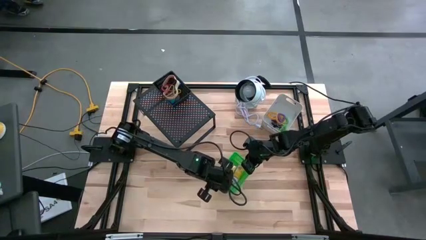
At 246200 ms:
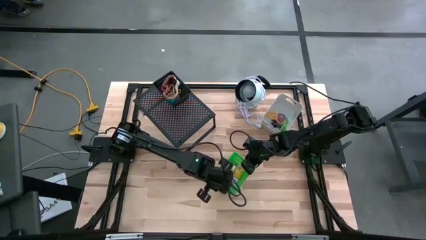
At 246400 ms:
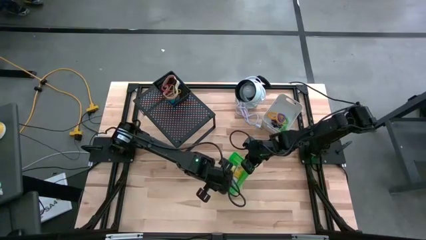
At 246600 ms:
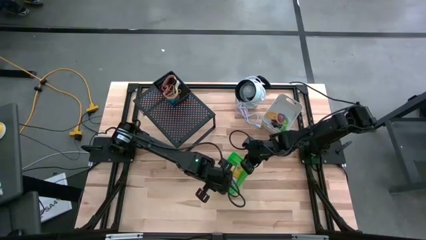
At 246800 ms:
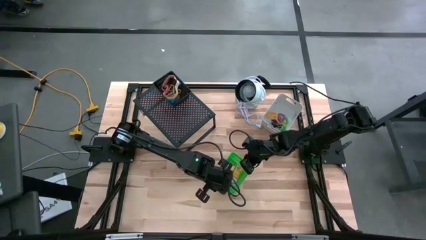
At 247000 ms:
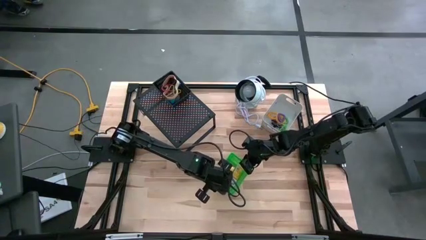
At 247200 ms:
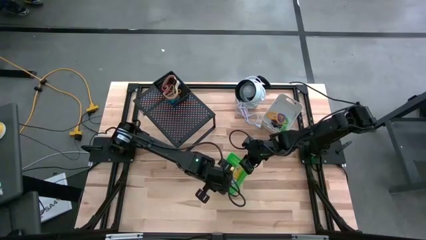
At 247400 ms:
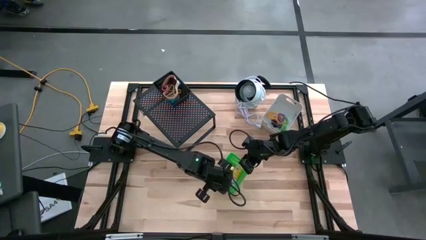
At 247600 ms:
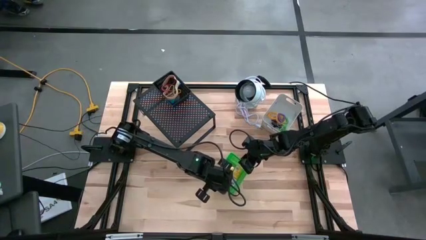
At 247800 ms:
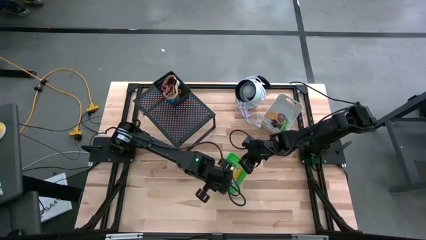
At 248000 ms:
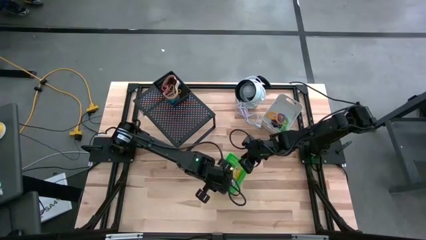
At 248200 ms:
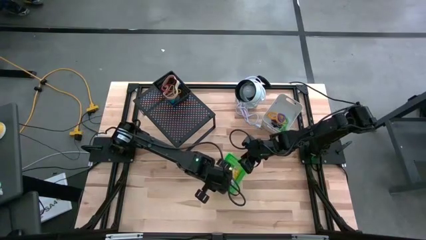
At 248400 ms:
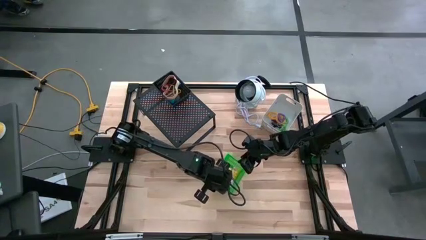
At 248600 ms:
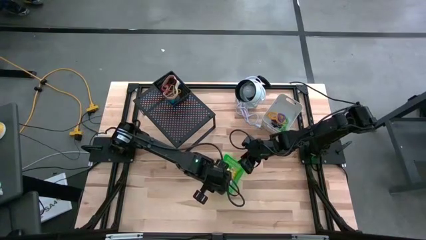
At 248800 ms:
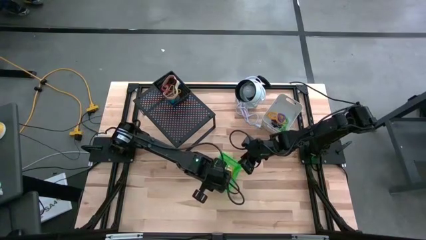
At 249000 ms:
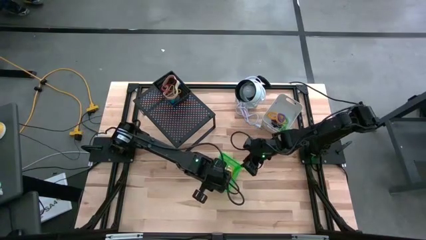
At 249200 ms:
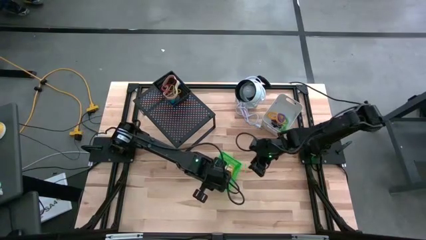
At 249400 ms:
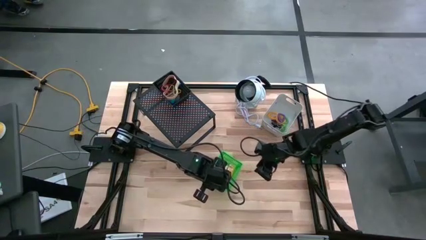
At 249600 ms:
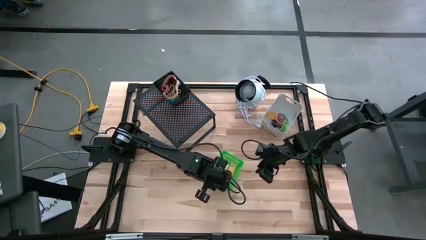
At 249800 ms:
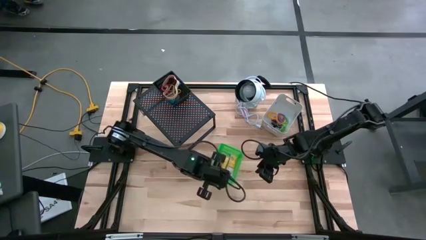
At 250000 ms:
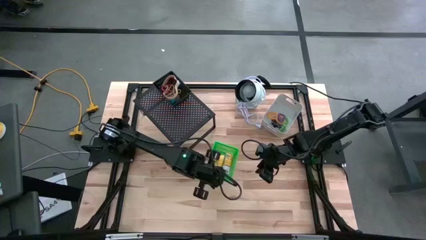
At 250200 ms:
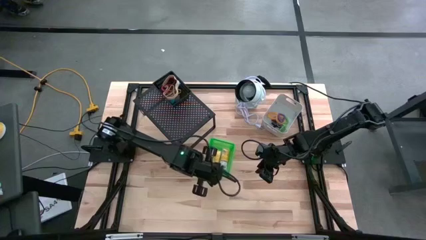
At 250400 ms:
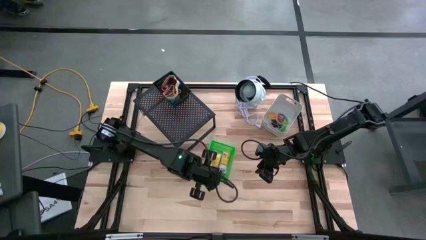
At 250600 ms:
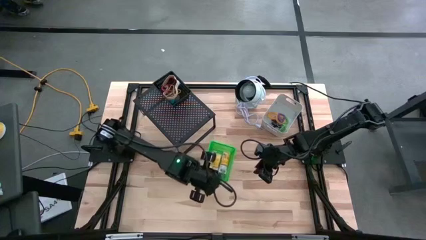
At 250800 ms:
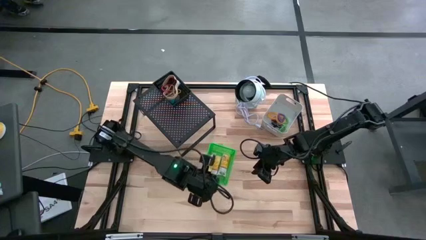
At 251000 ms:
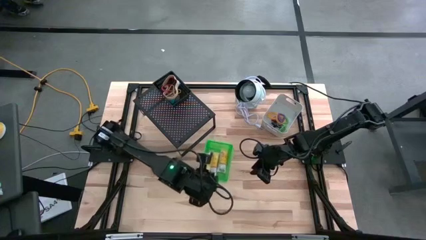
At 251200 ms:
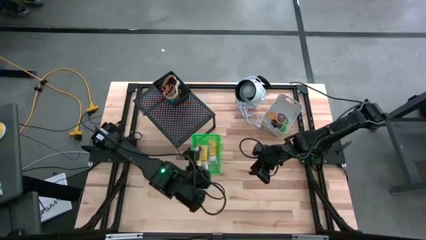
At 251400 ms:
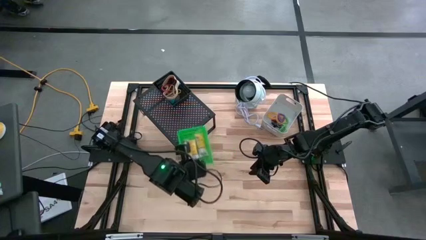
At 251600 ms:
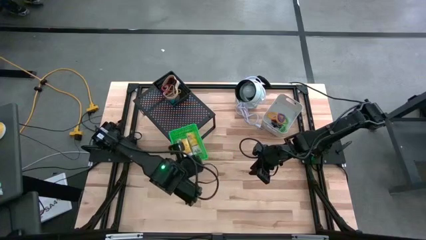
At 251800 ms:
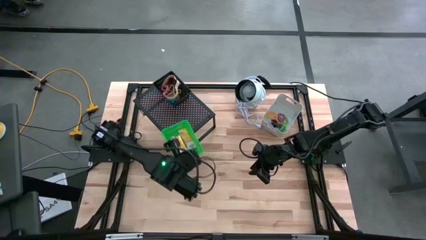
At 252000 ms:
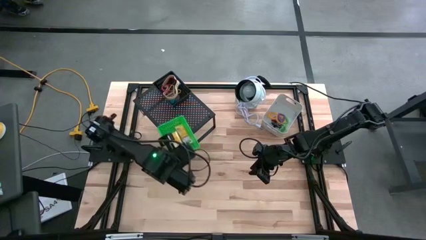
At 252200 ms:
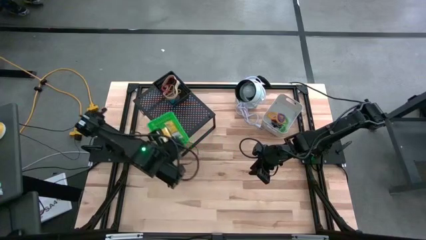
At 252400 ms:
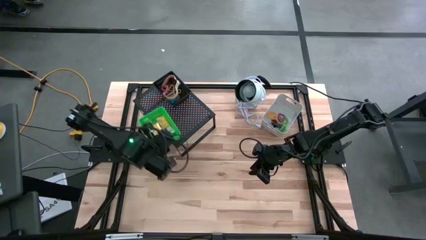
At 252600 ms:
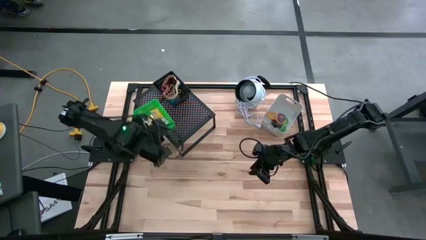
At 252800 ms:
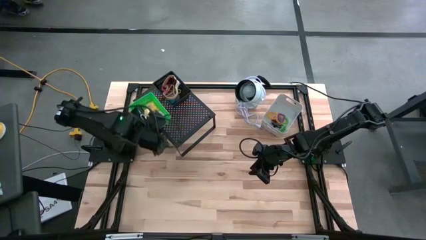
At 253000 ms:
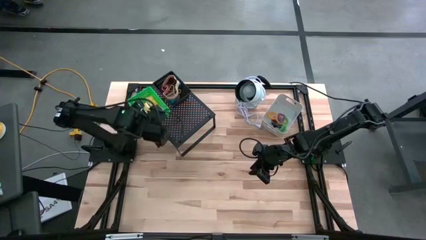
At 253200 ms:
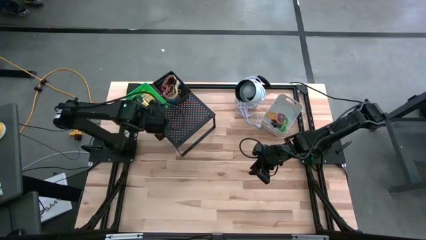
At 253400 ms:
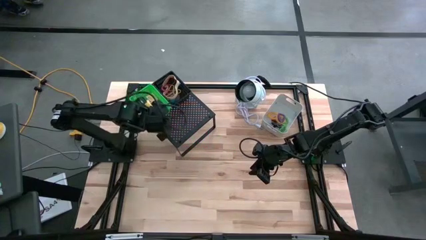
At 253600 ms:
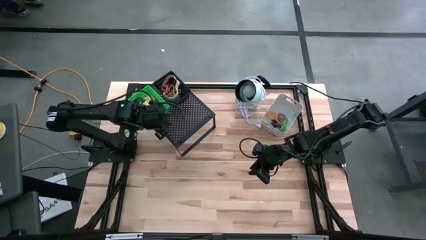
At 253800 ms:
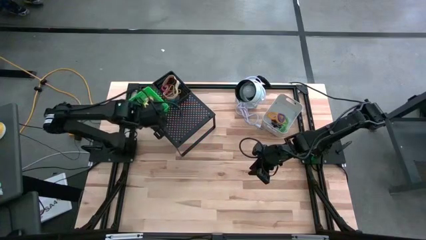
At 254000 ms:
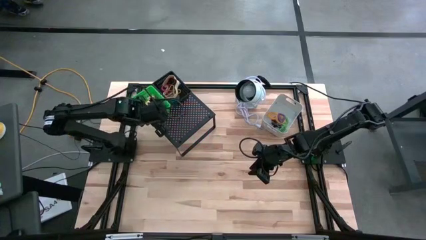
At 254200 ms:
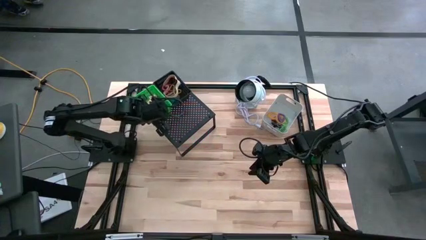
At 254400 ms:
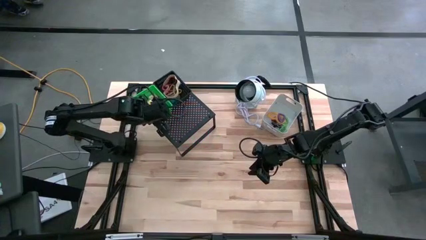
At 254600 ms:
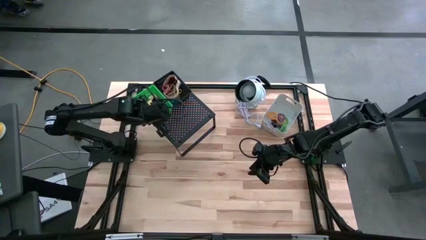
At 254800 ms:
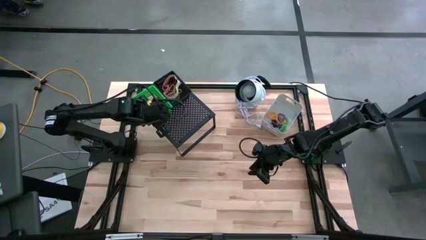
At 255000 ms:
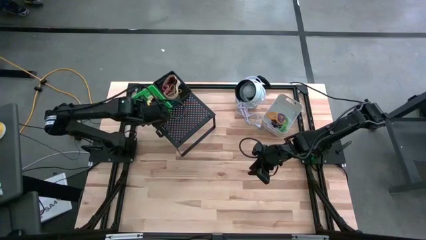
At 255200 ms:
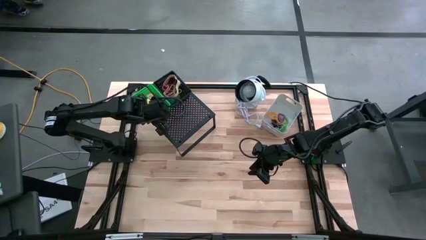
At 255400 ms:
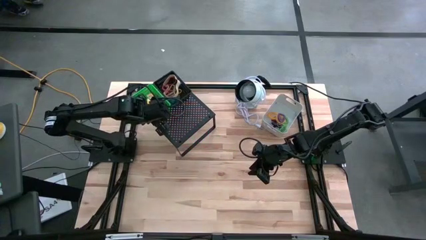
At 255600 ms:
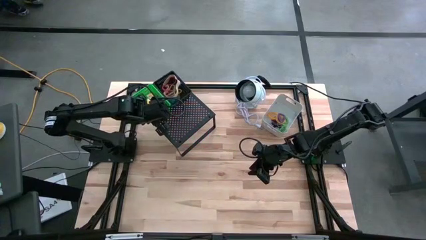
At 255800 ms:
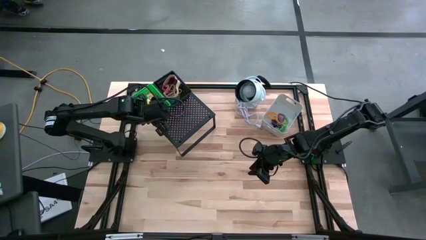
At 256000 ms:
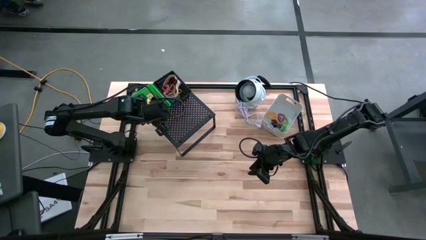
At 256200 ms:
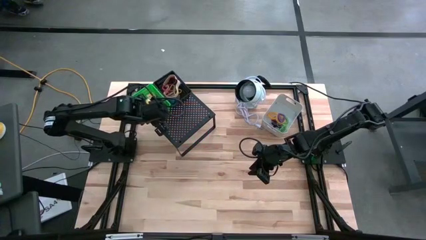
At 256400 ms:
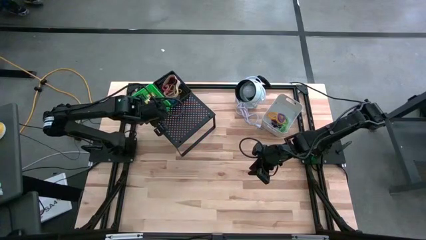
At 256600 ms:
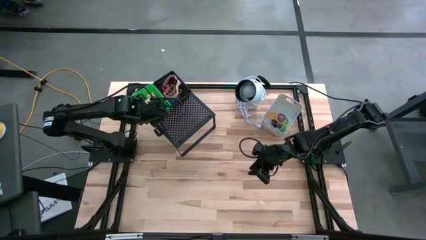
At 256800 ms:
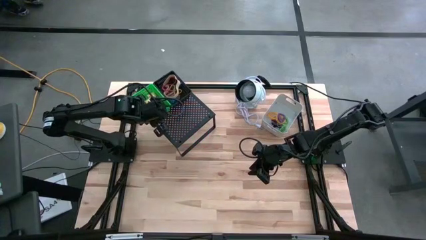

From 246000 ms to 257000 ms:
Task: Pick & Place Office Desk Supplies
Put the green bin on the shelf

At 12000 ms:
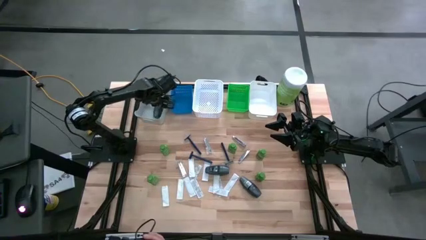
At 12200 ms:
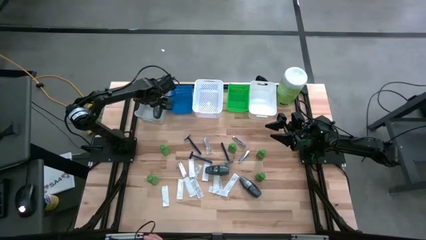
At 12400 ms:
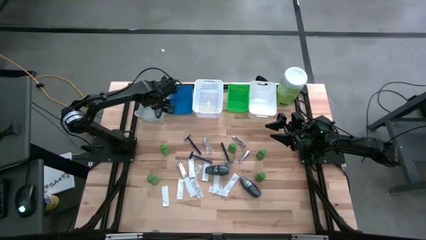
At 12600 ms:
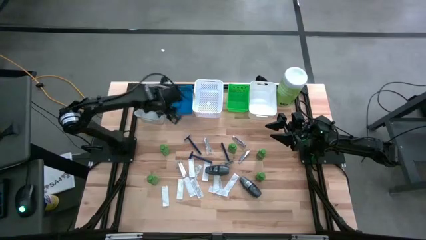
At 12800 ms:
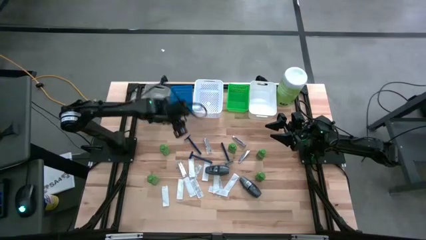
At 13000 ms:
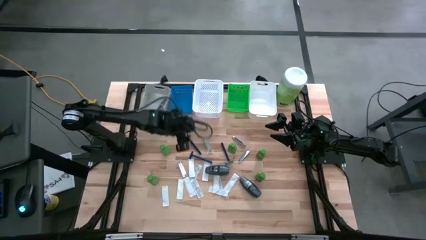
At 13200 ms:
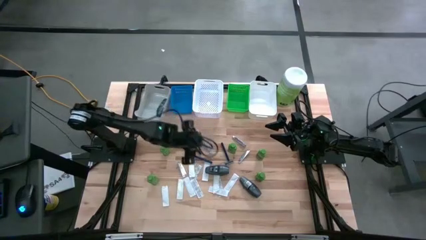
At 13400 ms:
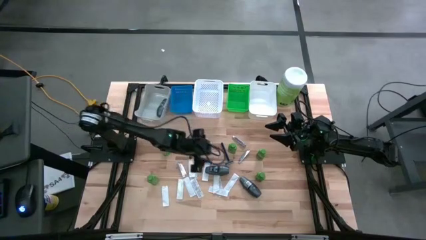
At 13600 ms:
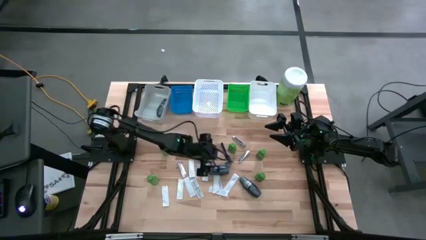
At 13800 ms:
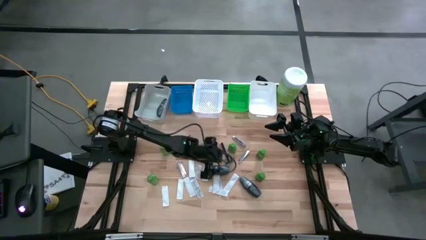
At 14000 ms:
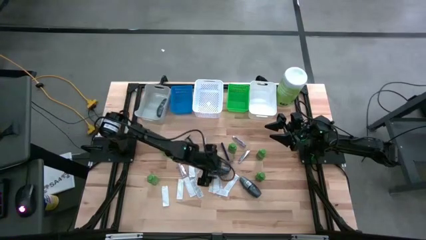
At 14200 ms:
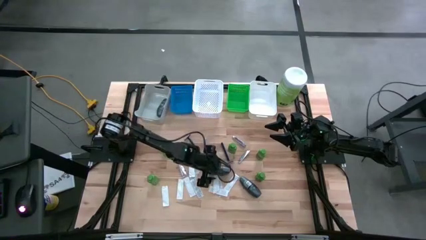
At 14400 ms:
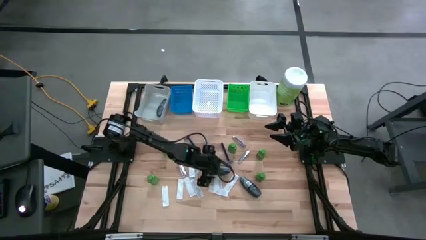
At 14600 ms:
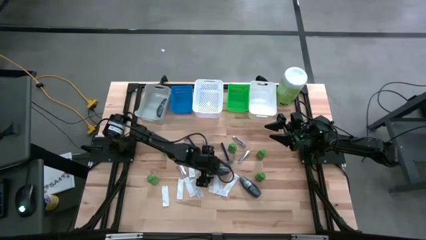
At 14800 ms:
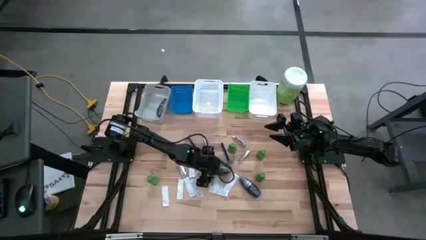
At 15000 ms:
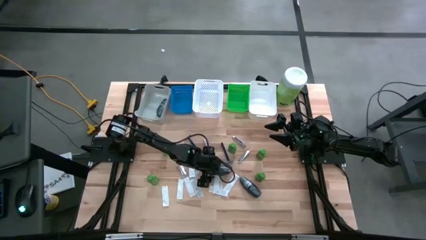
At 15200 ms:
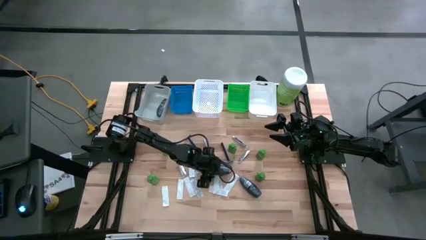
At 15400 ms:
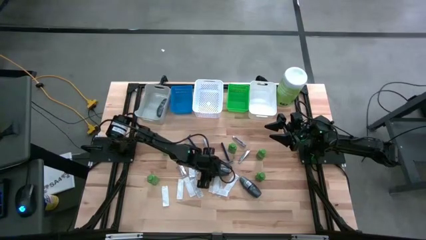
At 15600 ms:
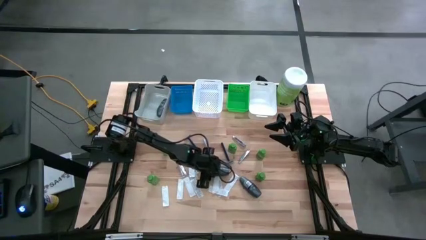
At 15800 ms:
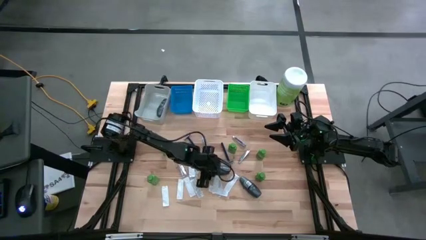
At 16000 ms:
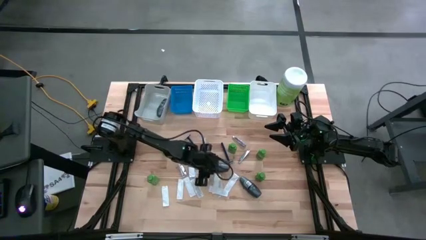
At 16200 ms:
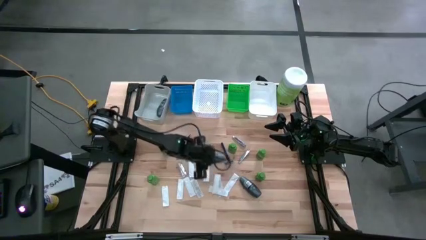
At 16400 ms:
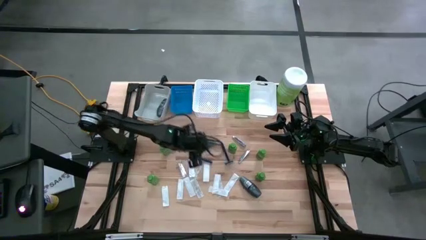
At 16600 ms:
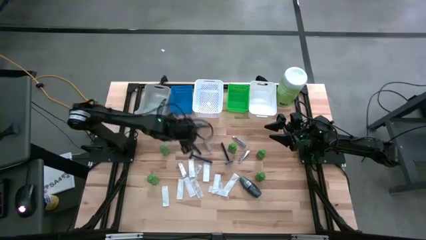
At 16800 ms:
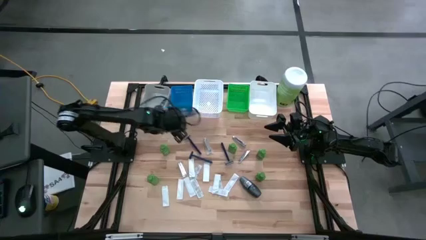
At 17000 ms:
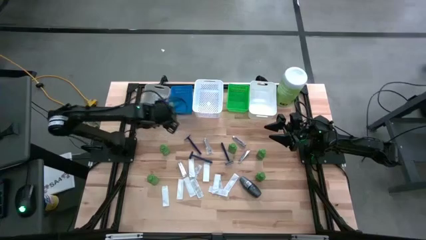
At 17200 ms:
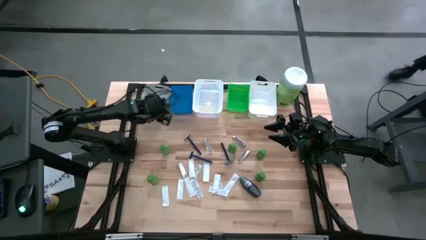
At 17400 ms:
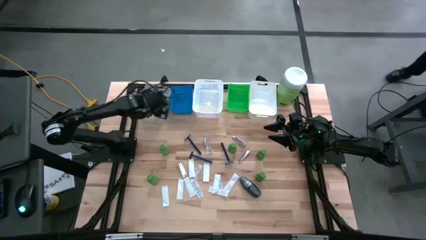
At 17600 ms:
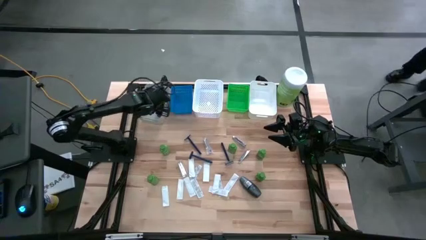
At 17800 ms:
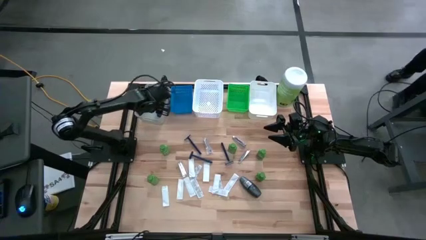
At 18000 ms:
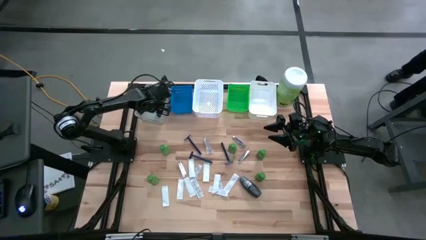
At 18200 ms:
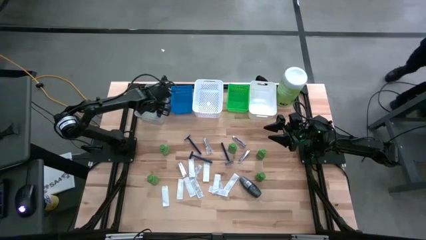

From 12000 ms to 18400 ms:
Task: Pick & Place Travel size toiletries
Put the left deodorant into the gray bin
